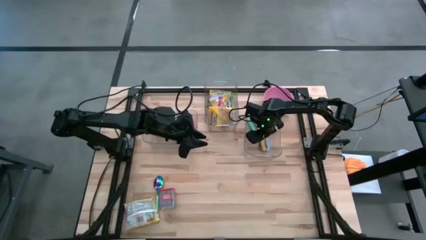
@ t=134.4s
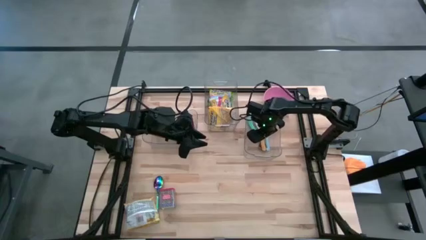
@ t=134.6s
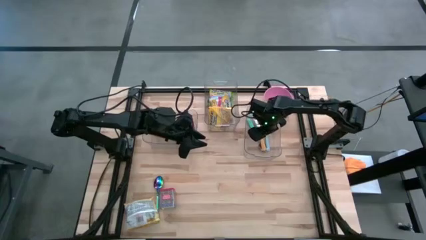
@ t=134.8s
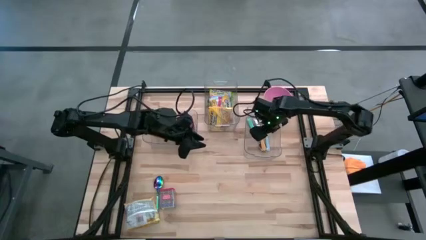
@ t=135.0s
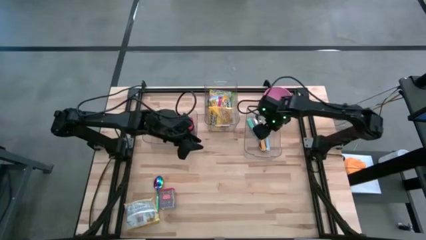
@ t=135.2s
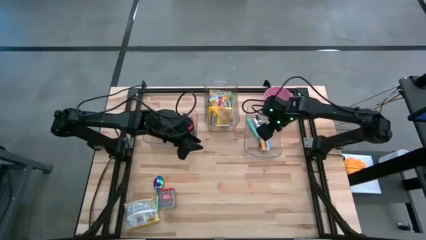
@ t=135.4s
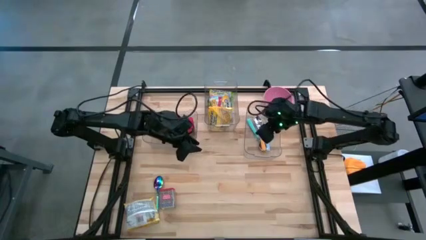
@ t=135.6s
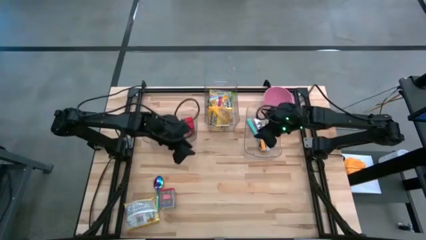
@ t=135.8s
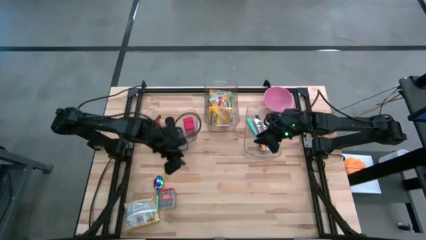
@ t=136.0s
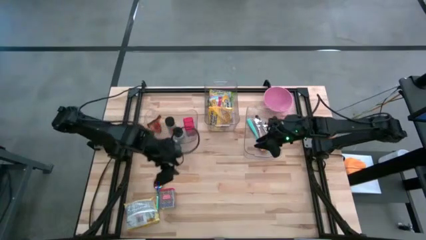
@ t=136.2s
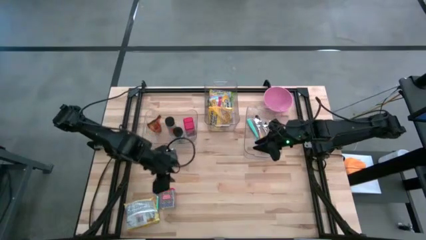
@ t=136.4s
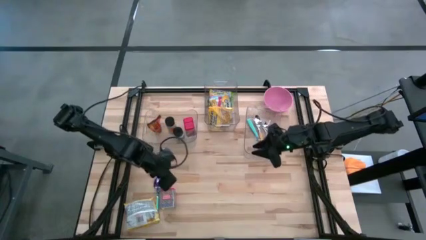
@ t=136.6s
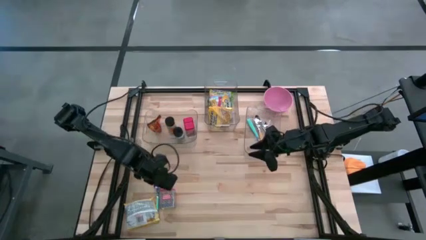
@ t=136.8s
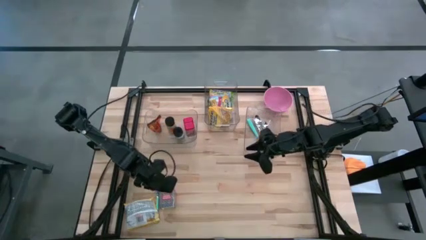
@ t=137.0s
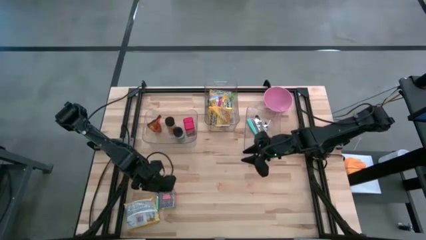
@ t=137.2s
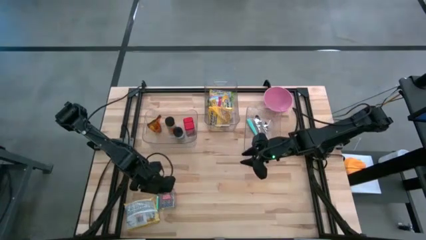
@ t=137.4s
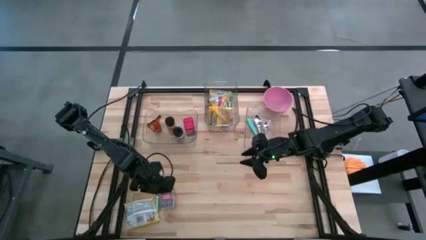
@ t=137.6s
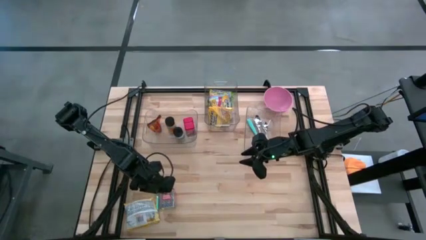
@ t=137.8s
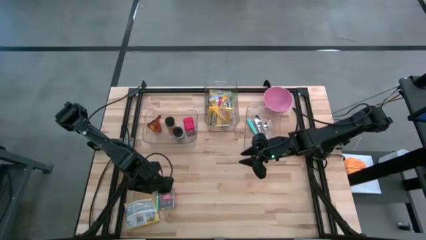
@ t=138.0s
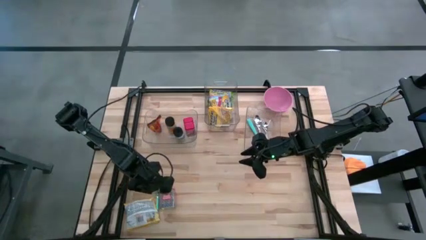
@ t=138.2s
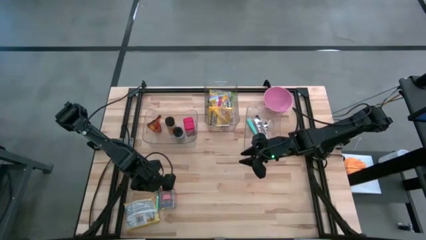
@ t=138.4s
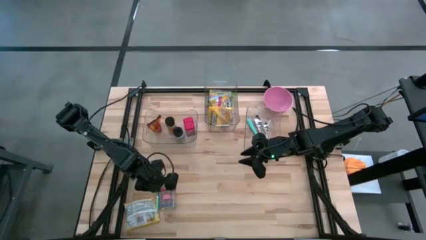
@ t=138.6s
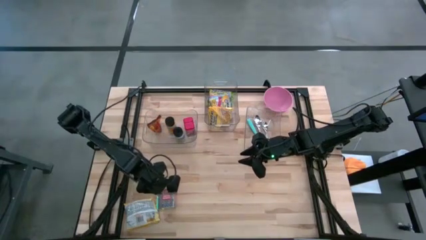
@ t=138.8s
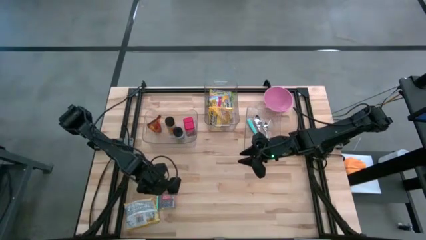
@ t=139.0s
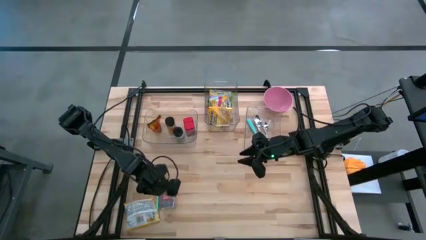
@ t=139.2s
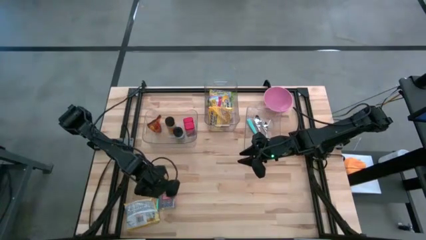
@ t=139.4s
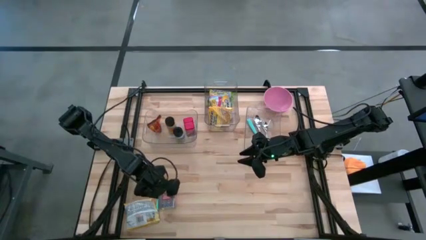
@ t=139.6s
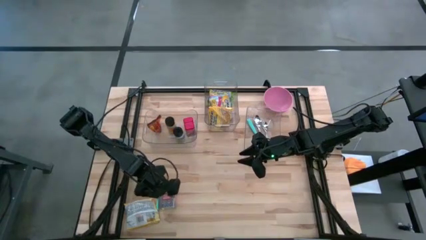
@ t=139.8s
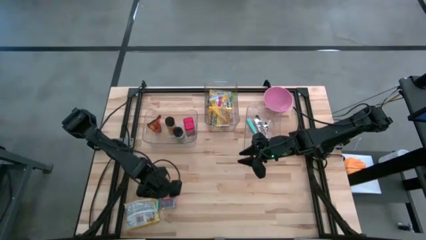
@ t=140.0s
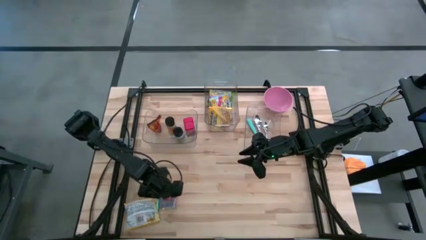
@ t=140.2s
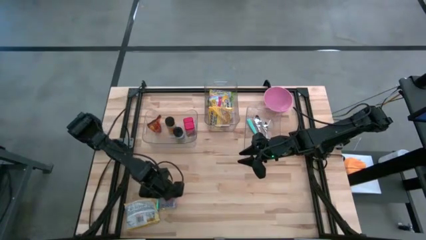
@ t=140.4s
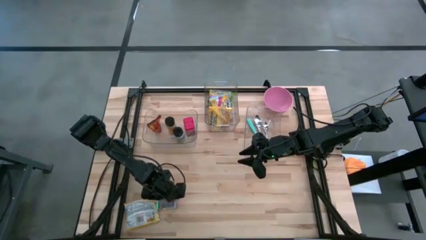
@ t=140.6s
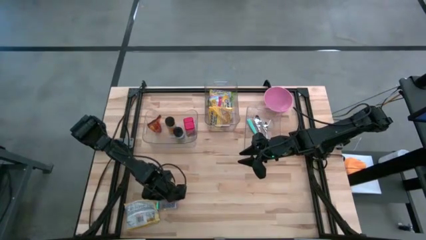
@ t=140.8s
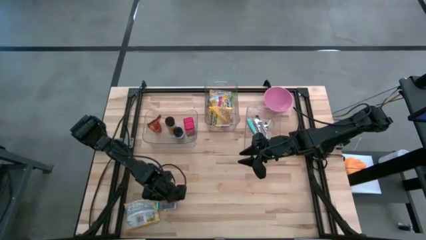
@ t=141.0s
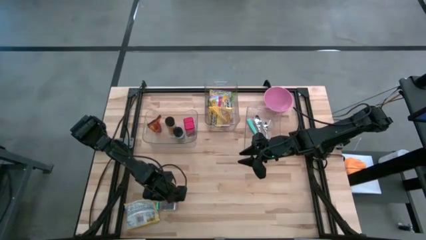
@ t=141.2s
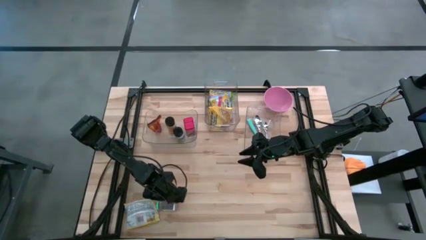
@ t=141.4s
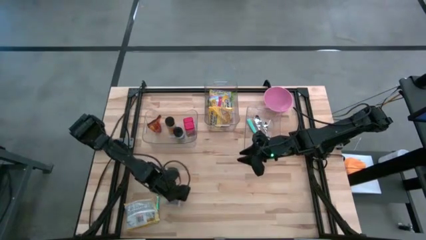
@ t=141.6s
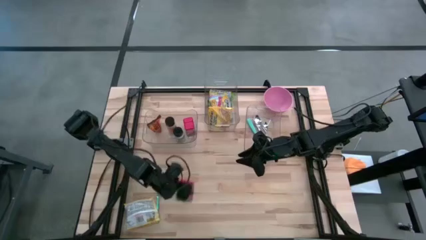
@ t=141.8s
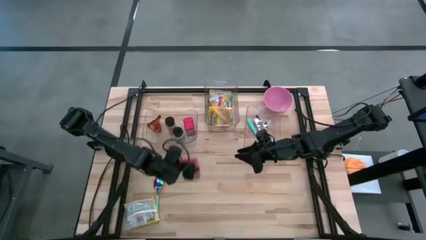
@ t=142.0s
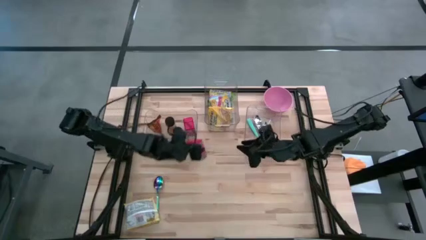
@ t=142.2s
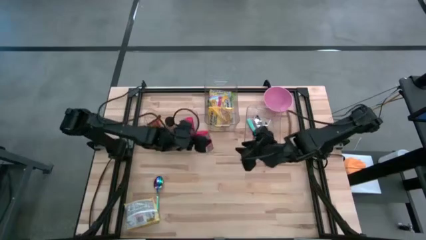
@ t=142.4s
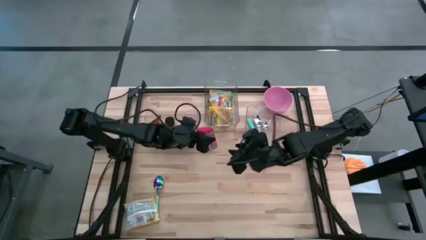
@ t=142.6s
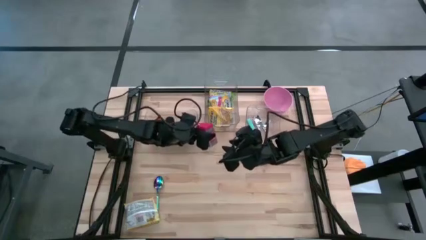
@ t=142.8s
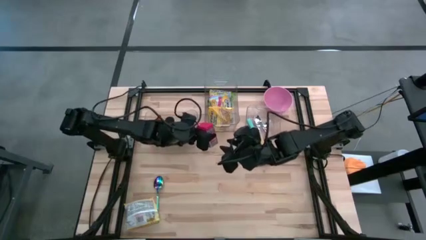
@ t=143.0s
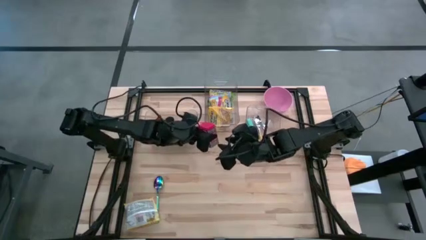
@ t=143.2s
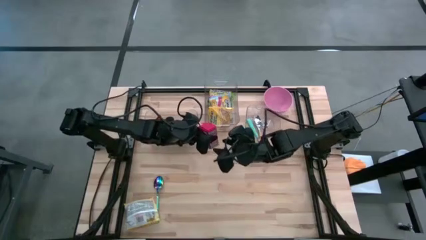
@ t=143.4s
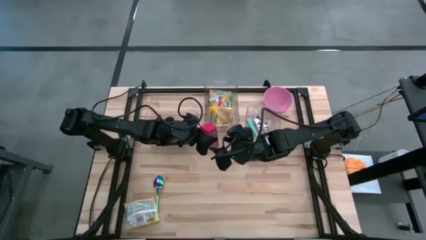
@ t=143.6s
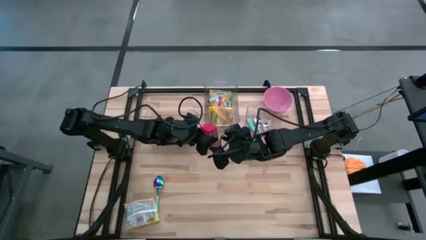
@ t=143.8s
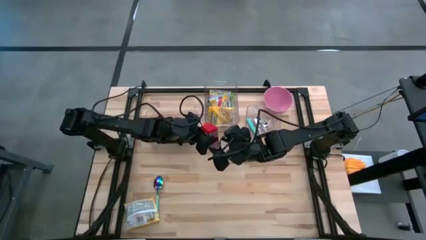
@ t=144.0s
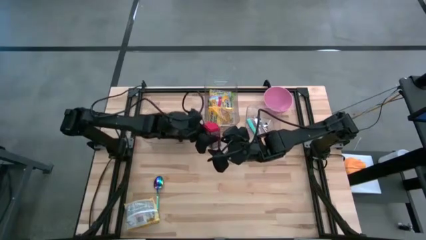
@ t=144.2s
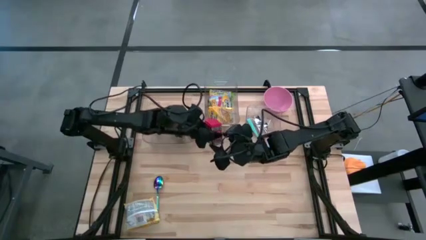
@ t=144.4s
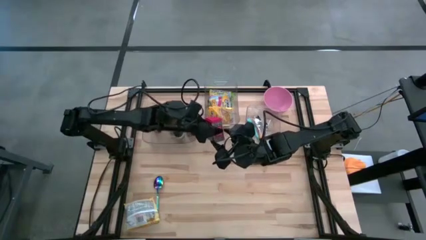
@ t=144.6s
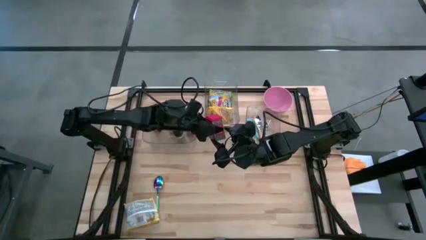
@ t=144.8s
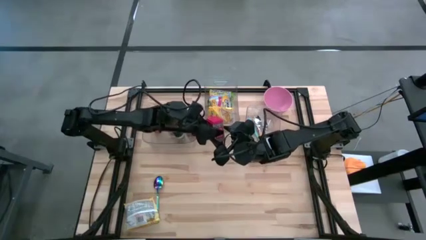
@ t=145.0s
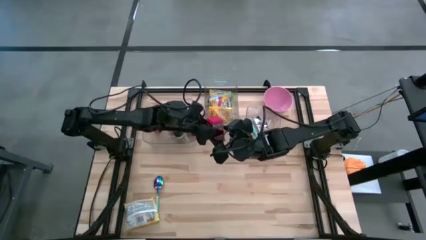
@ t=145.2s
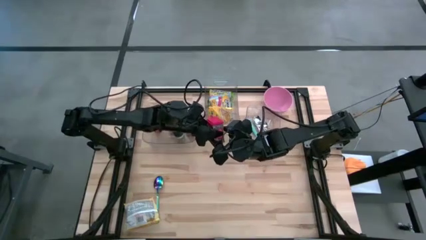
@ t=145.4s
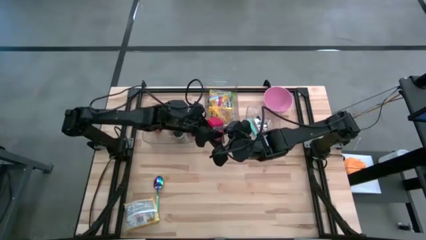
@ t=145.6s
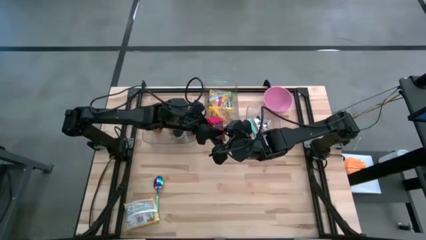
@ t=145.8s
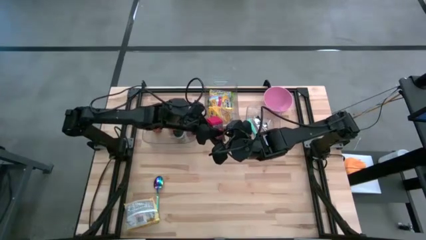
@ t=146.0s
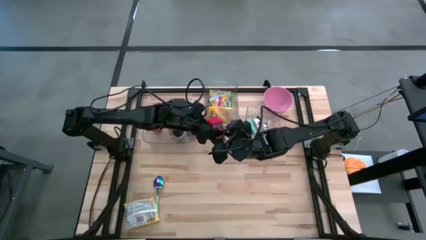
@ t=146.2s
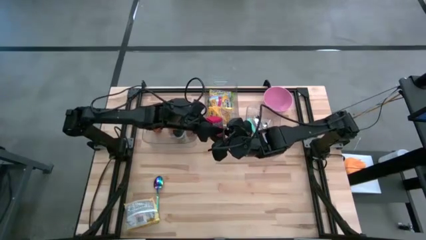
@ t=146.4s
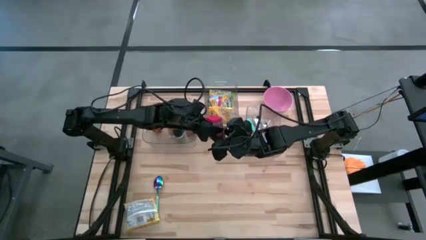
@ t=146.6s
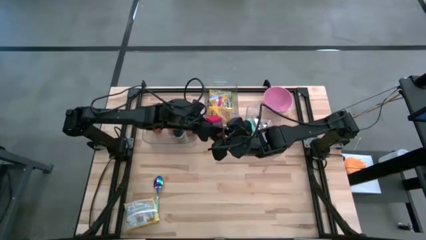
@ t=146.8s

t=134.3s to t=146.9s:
Put the red seasoning can into the left transparent bin
